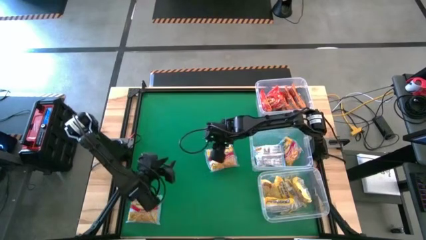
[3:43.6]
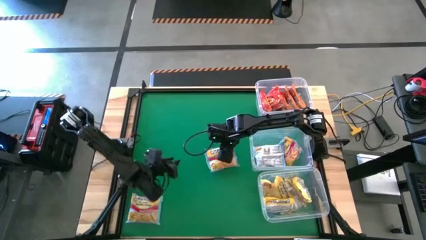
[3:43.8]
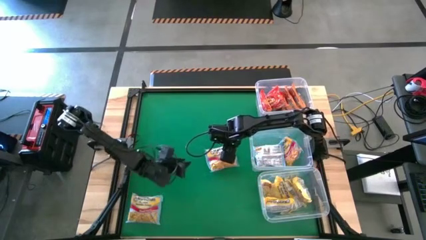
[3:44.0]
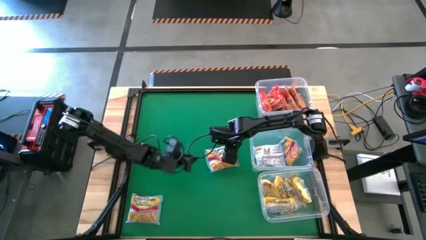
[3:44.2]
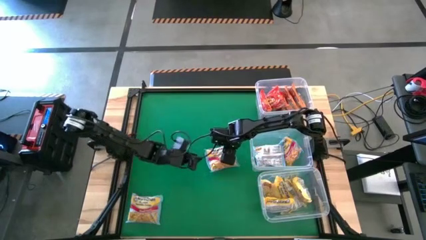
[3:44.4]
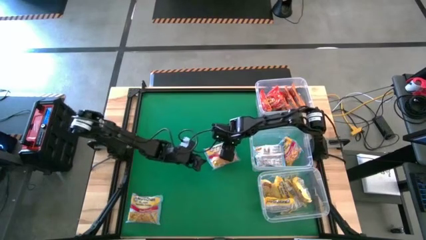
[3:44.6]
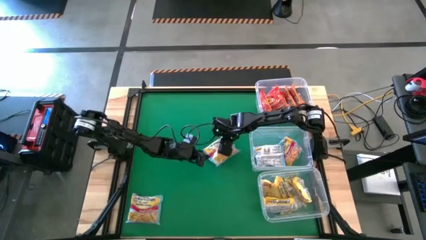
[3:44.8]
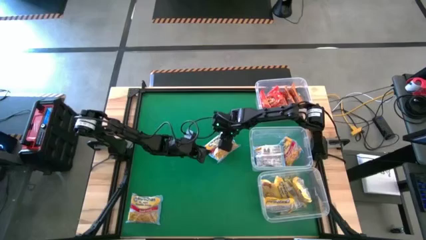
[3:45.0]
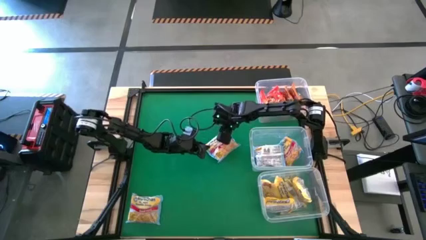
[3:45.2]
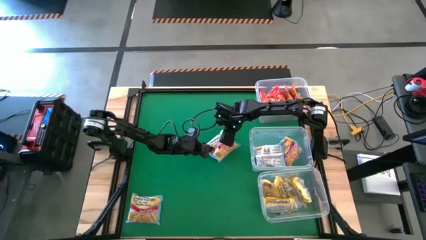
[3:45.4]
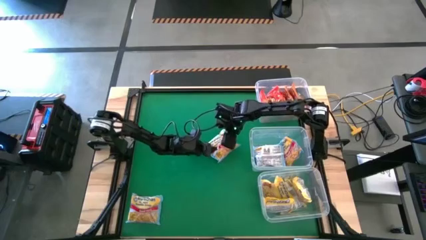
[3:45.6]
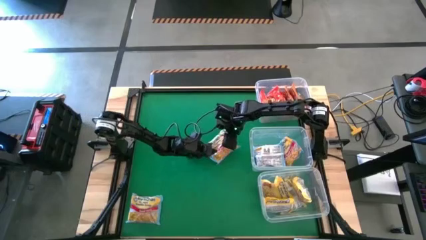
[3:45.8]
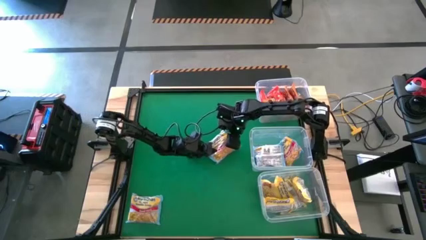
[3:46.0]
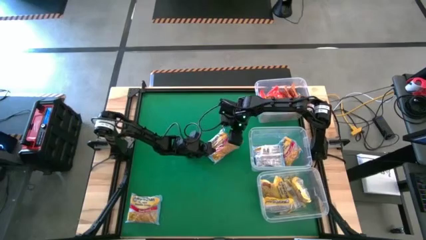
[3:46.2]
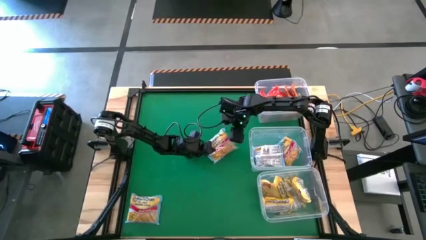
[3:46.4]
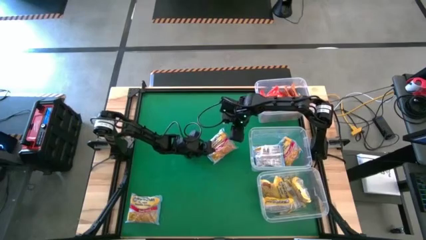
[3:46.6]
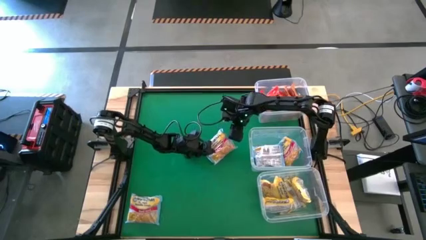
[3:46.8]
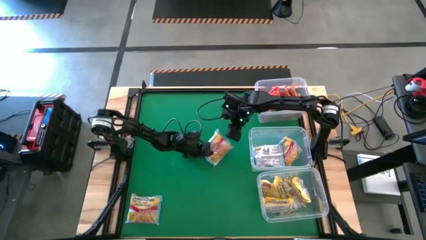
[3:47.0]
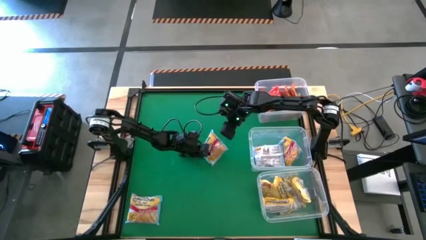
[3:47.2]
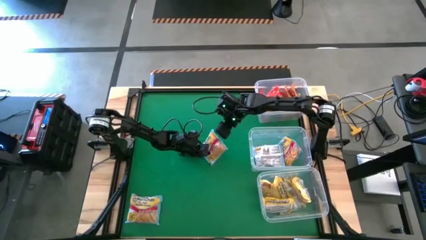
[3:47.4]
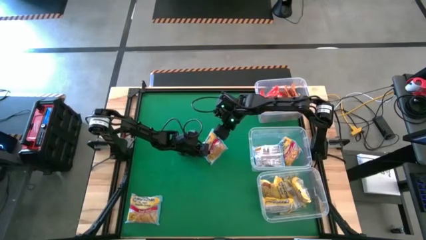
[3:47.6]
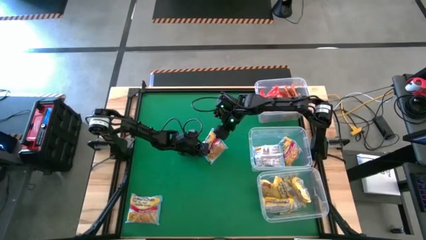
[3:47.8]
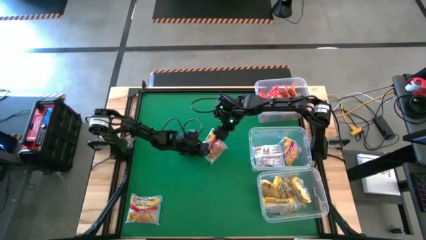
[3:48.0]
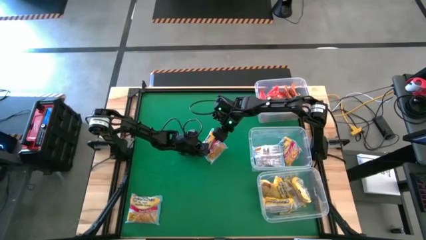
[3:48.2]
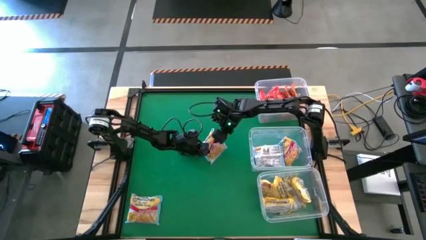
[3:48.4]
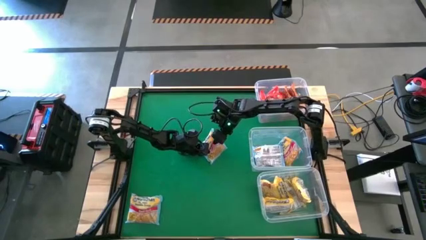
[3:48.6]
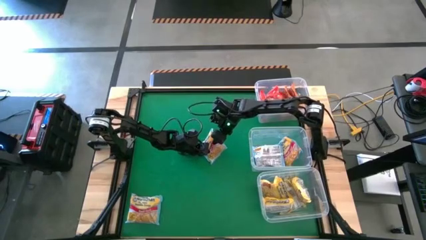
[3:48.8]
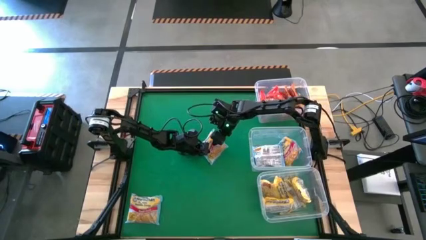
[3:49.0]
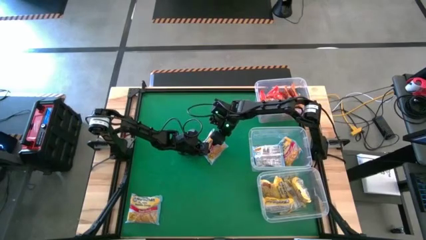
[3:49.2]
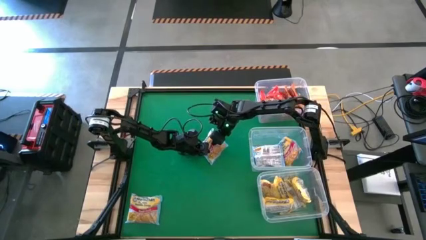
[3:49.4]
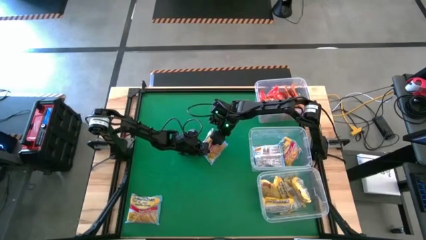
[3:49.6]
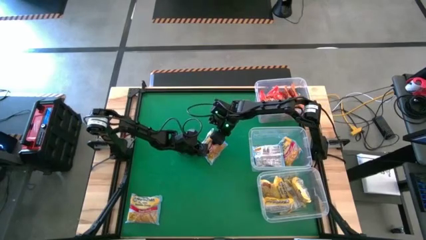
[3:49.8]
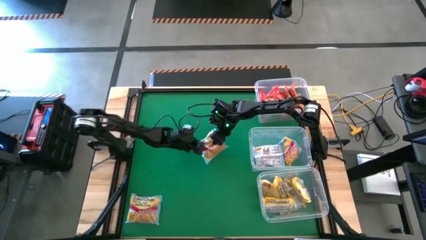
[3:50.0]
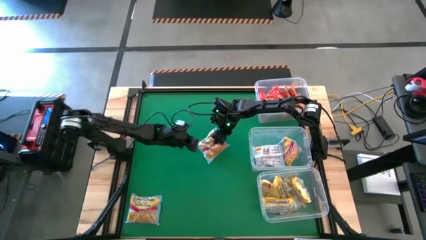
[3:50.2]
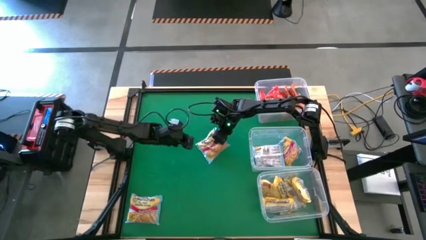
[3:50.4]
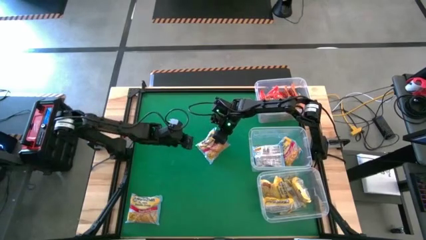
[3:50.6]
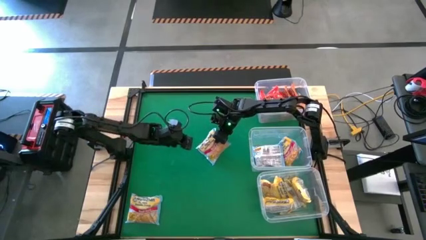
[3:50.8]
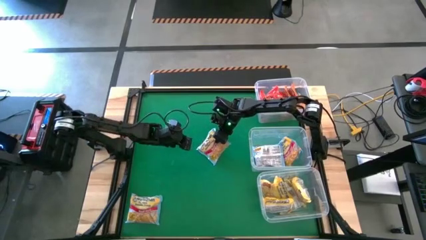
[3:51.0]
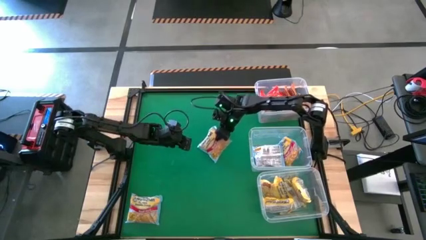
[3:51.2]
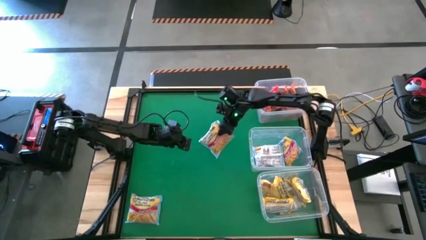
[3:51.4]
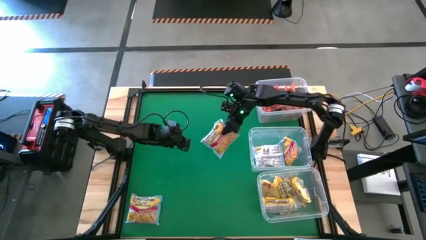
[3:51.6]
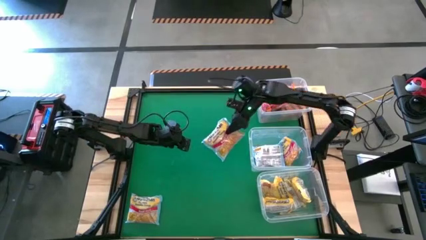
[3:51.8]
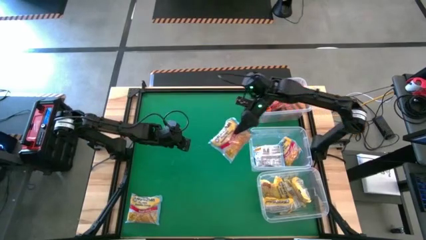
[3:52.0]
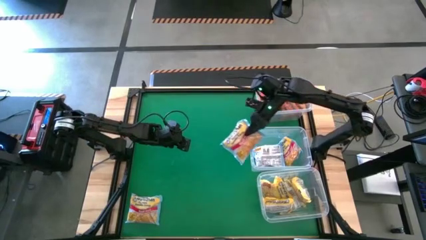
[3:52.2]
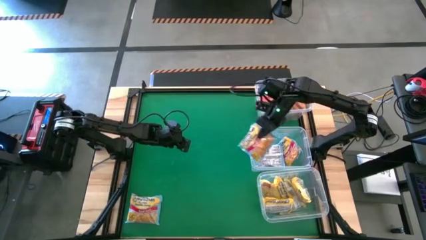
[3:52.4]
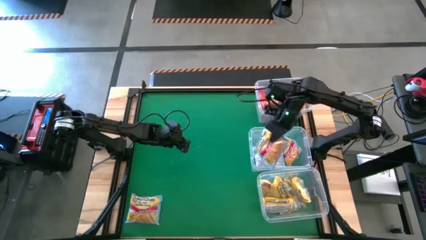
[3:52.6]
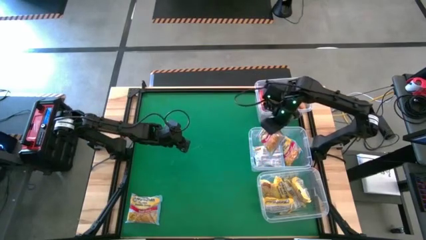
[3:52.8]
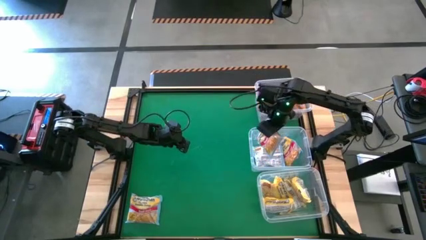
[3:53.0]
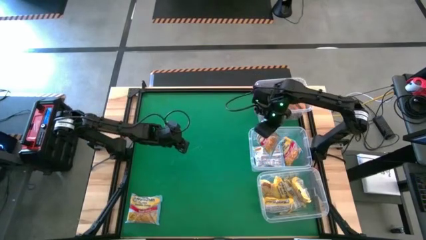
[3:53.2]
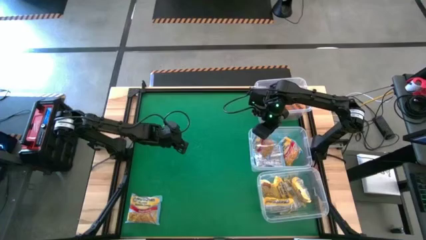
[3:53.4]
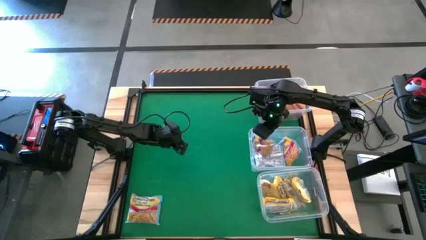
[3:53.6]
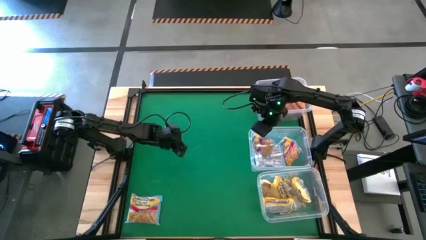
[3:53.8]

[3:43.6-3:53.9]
Task: Sort Maruchan noodles
Put the center blue noodle pack into the middle transparent bin

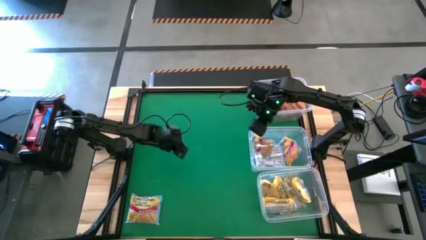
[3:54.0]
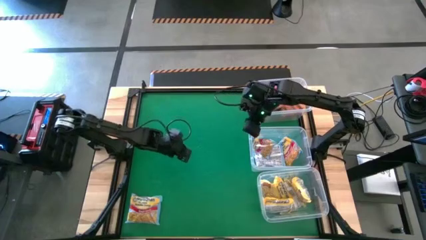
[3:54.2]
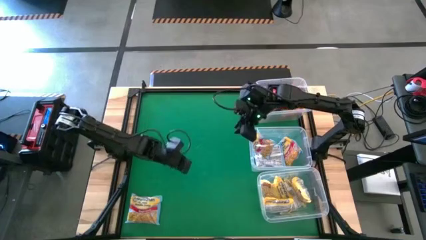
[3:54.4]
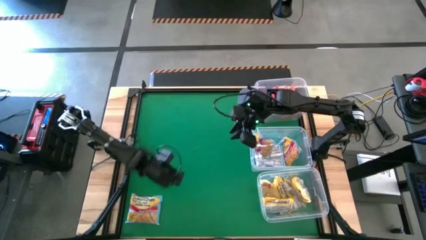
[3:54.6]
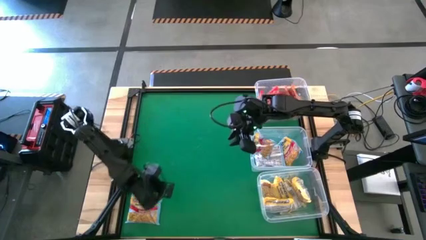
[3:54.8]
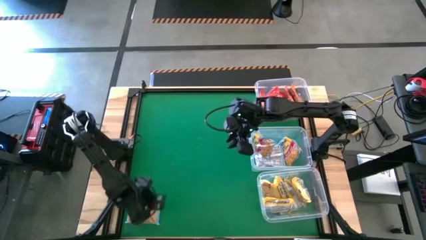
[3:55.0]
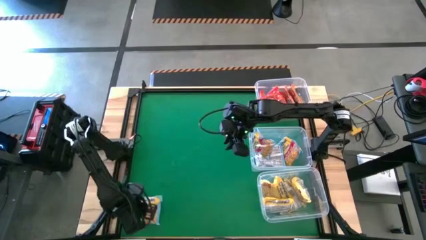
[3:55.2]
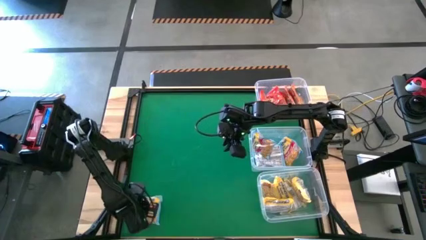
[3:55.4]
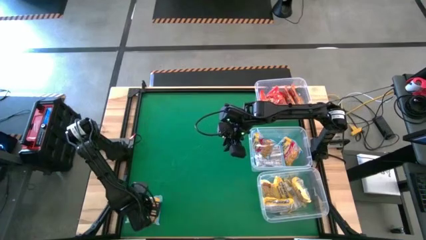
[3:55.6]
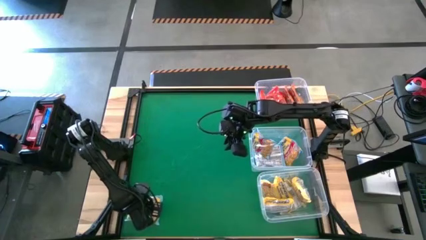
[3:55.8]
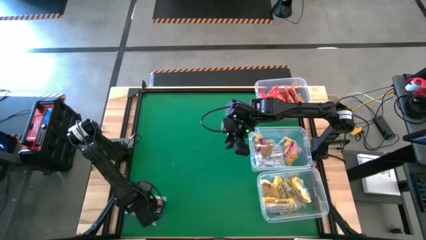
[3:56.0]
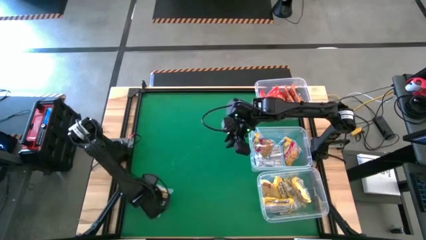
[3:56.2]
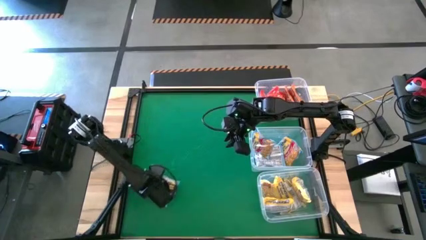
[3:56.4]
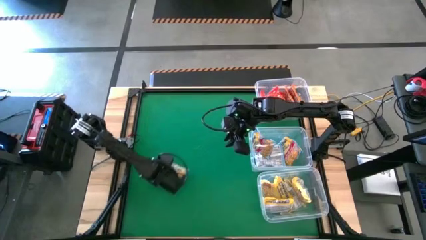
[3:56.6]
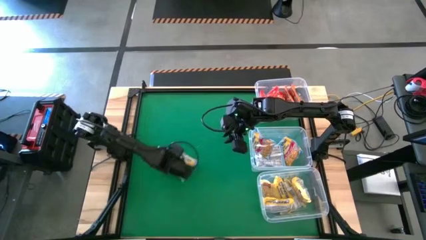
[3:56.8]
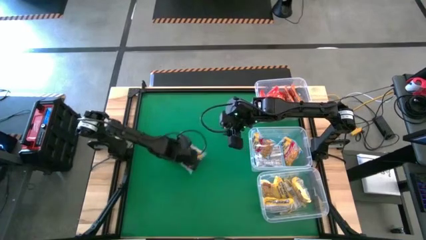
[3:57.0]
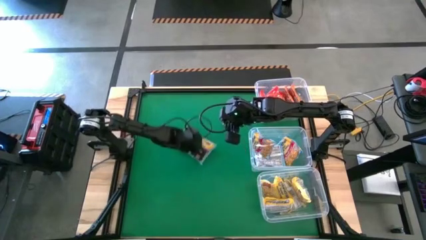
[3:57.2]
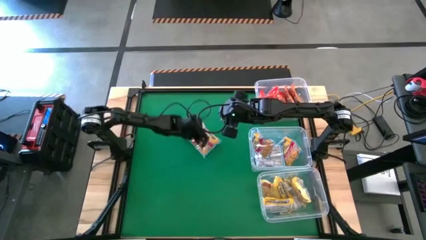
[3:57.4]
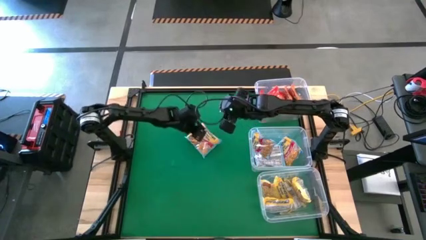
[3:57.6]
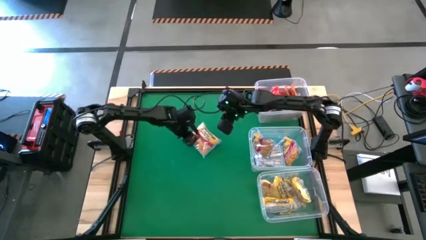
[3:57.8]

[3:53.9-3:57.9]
Move the right blue noodle pack to the center of the table
